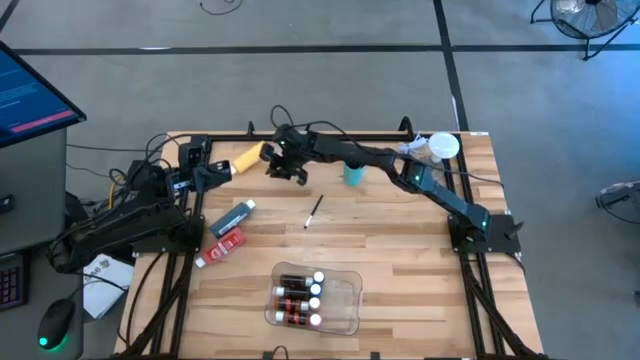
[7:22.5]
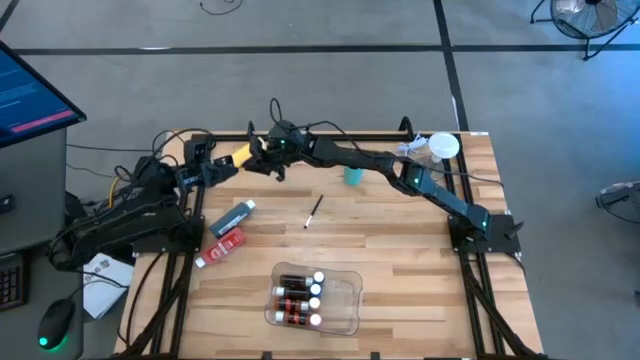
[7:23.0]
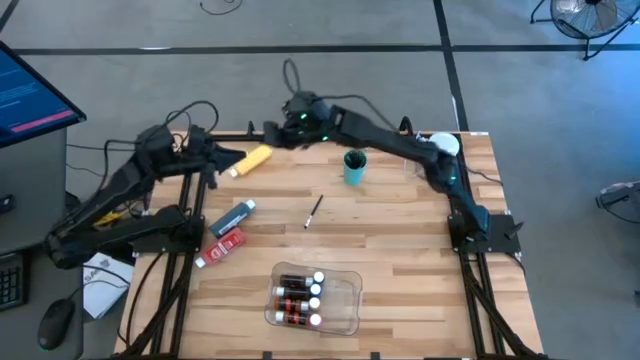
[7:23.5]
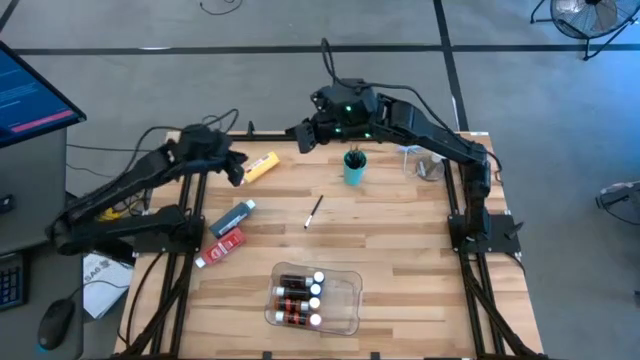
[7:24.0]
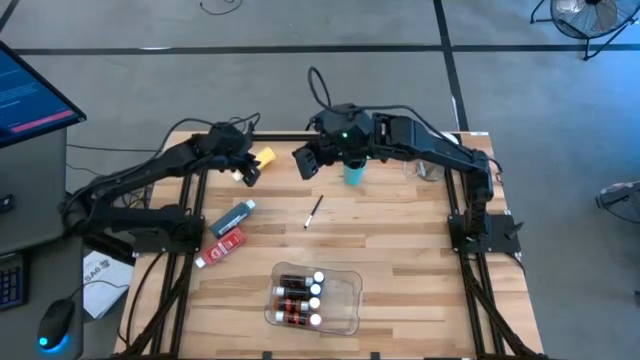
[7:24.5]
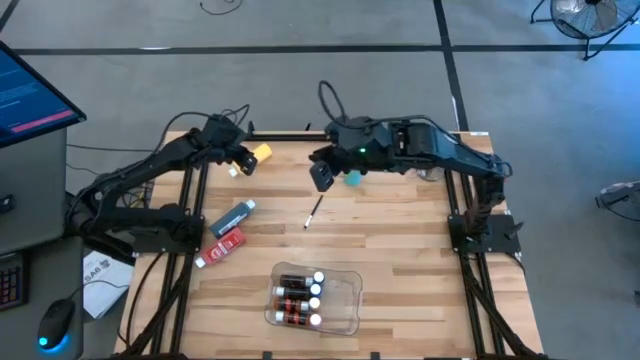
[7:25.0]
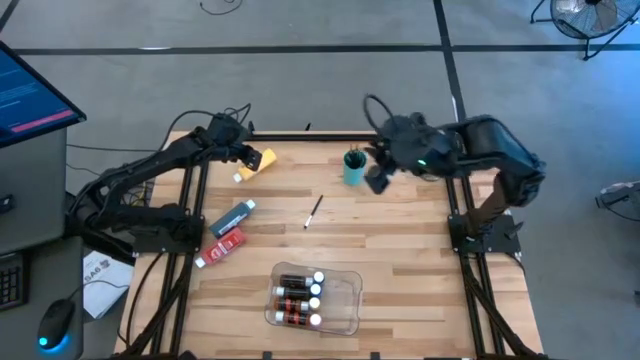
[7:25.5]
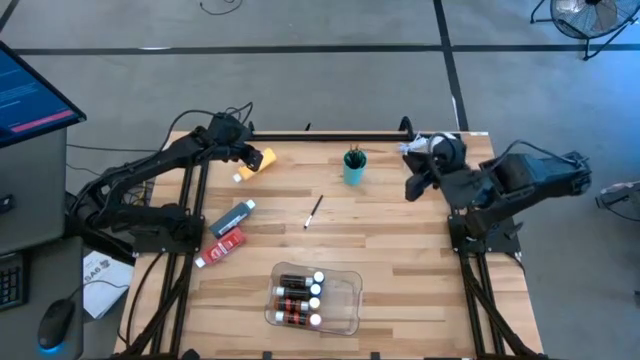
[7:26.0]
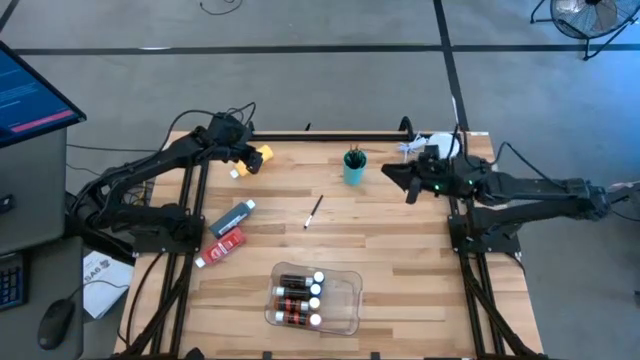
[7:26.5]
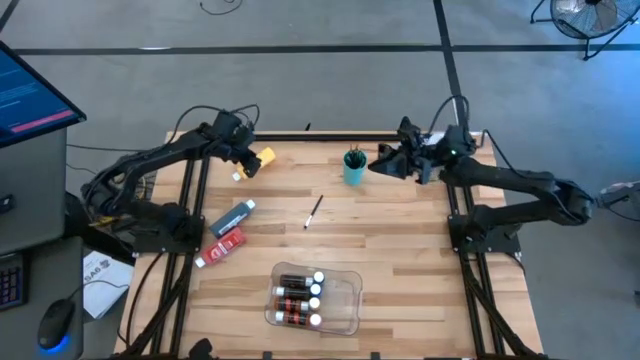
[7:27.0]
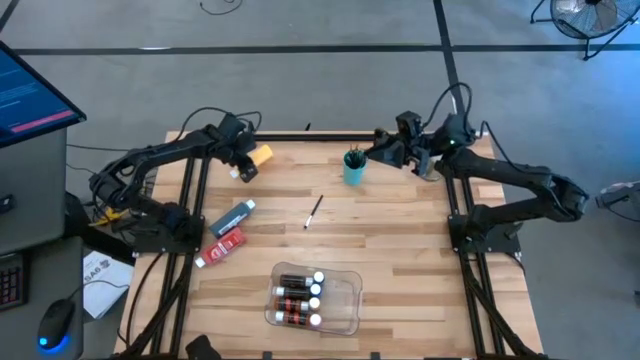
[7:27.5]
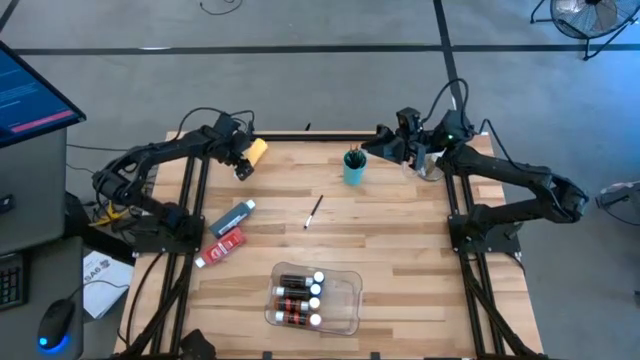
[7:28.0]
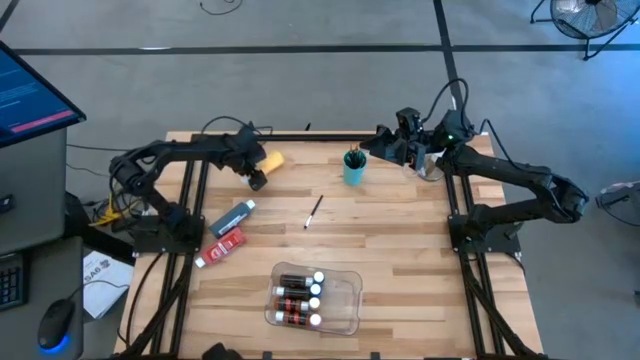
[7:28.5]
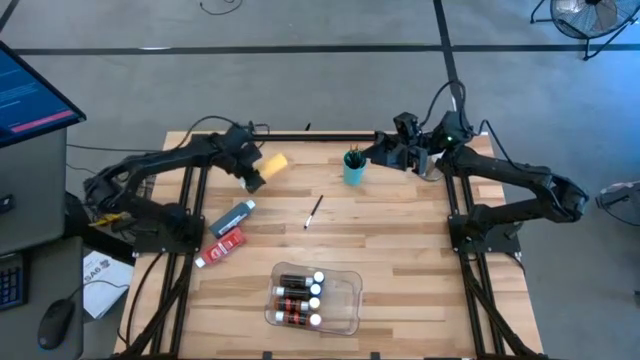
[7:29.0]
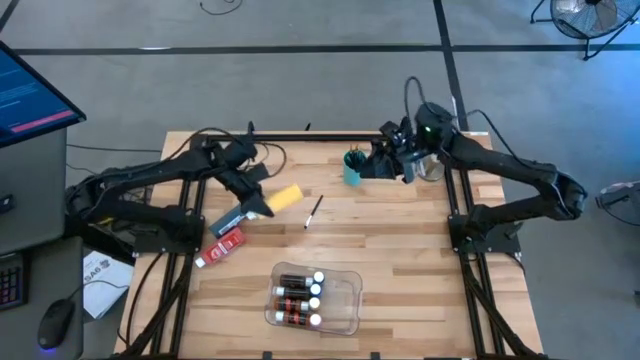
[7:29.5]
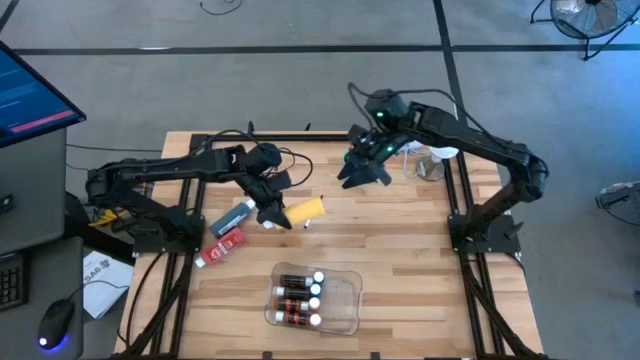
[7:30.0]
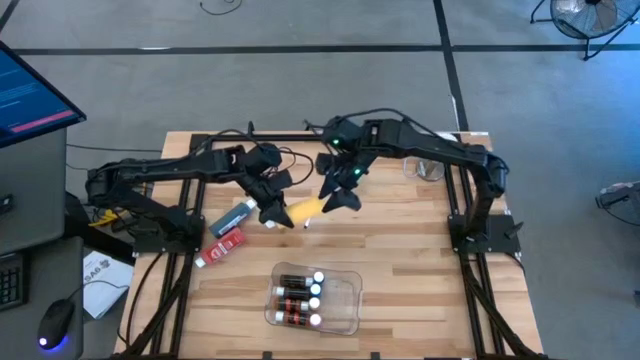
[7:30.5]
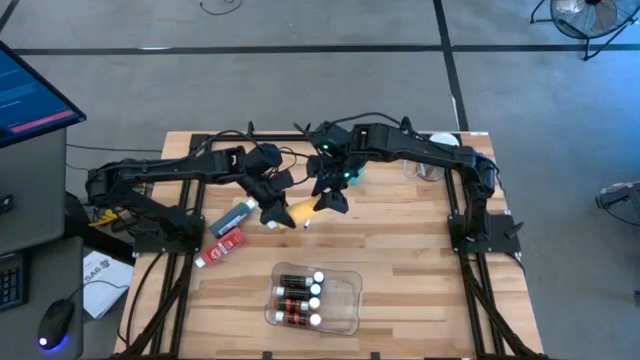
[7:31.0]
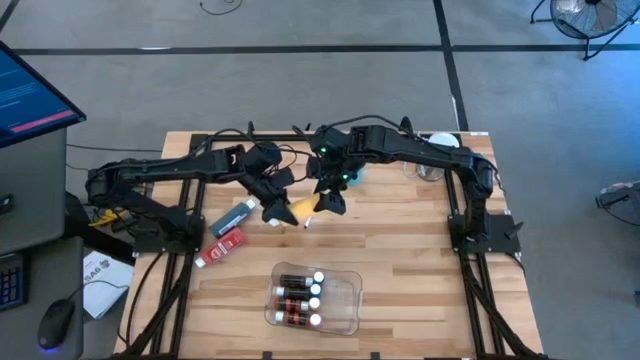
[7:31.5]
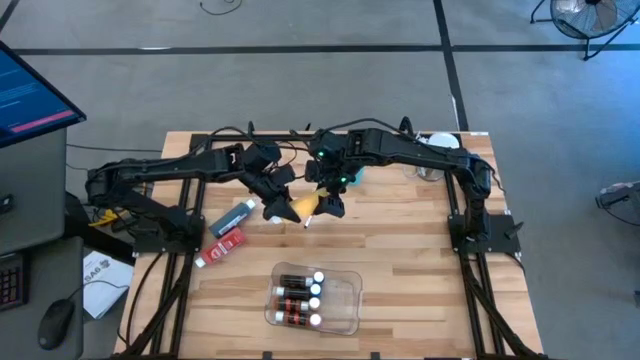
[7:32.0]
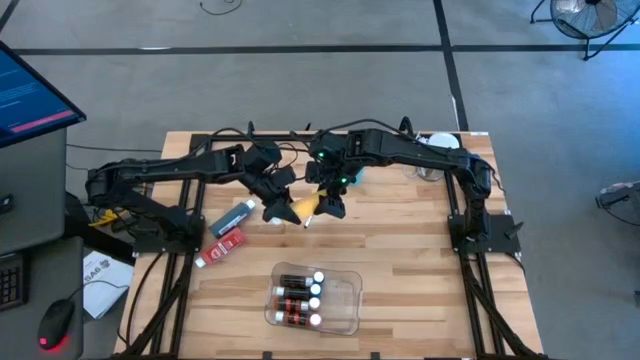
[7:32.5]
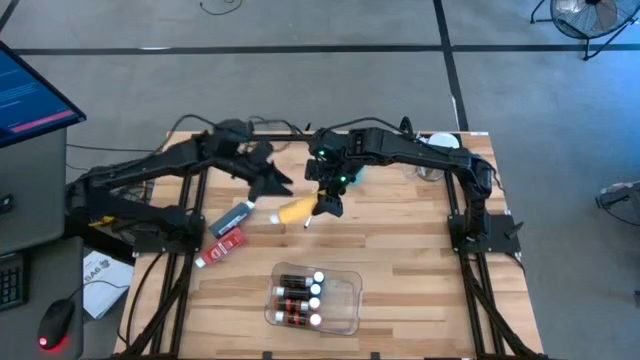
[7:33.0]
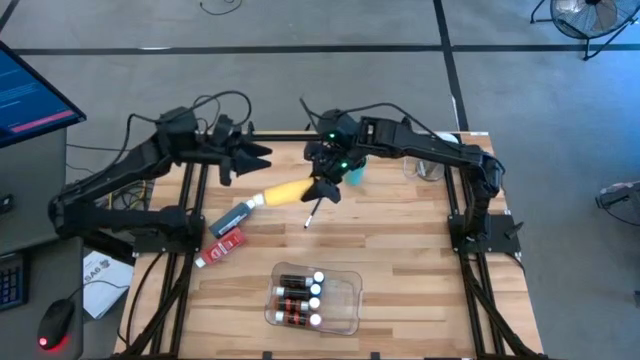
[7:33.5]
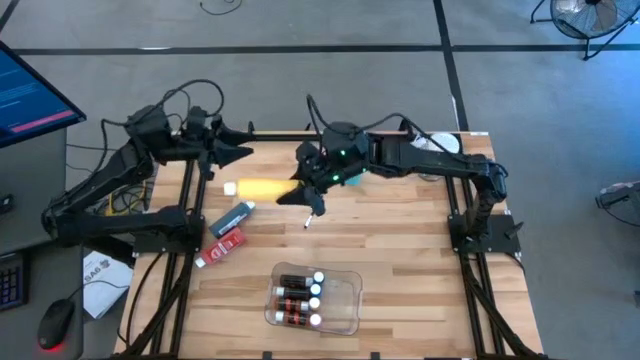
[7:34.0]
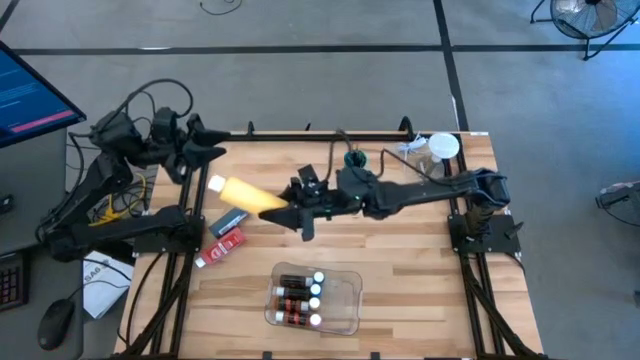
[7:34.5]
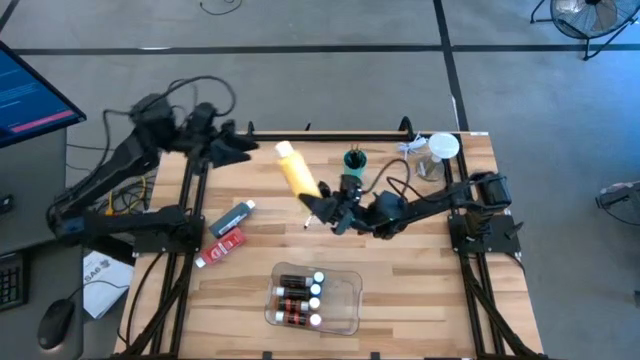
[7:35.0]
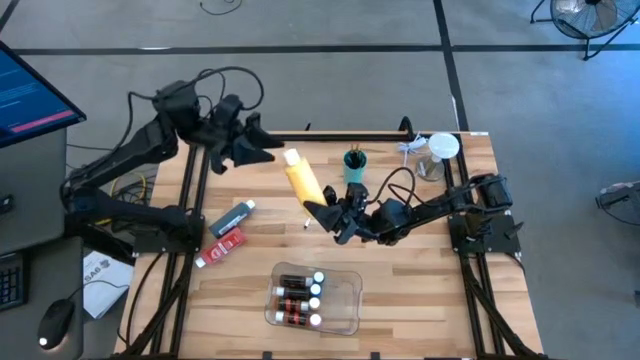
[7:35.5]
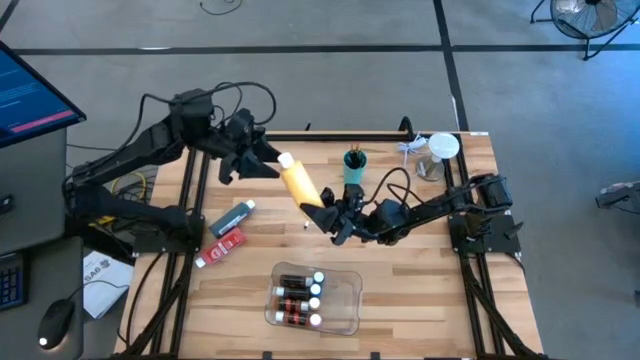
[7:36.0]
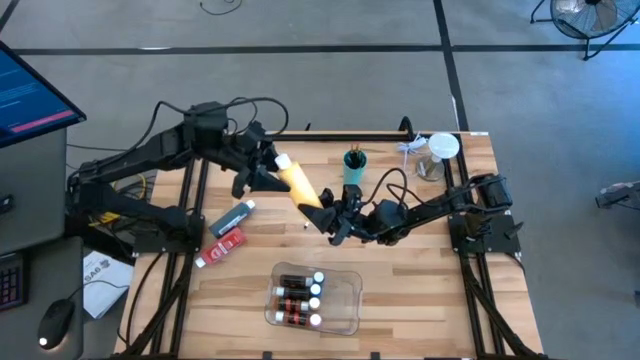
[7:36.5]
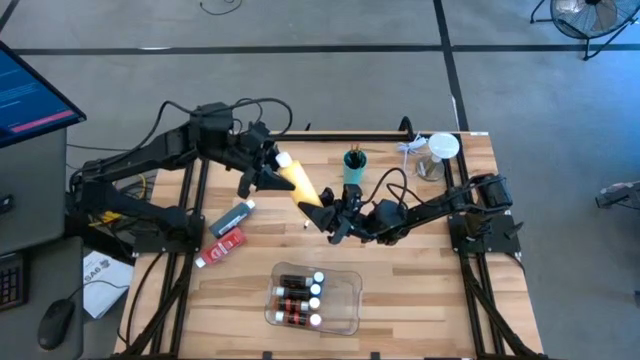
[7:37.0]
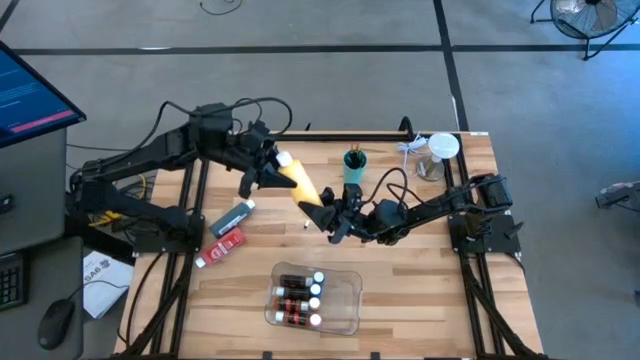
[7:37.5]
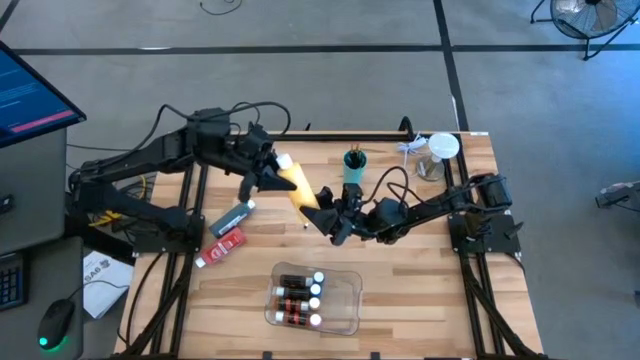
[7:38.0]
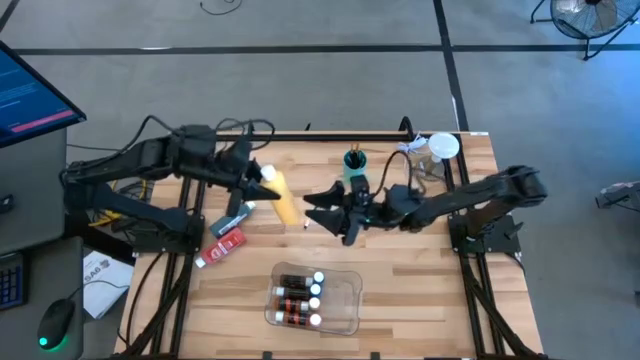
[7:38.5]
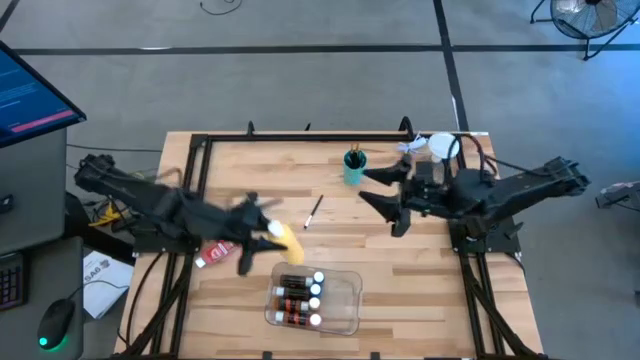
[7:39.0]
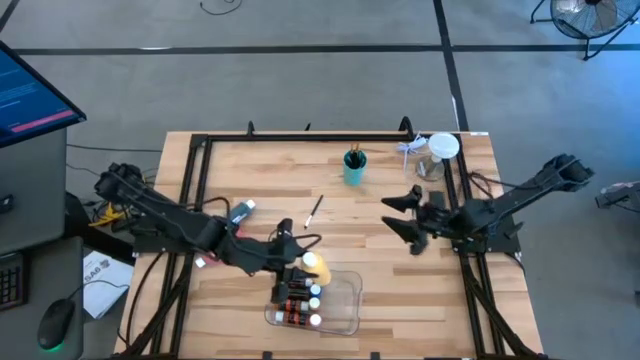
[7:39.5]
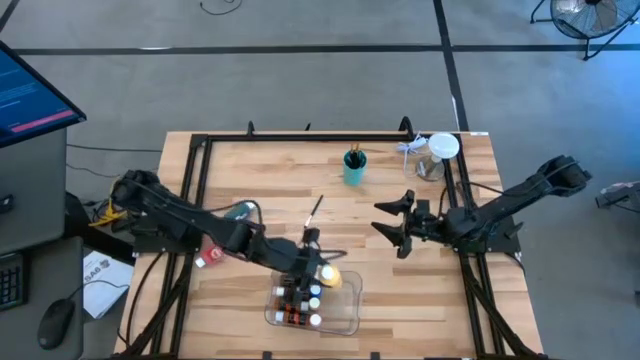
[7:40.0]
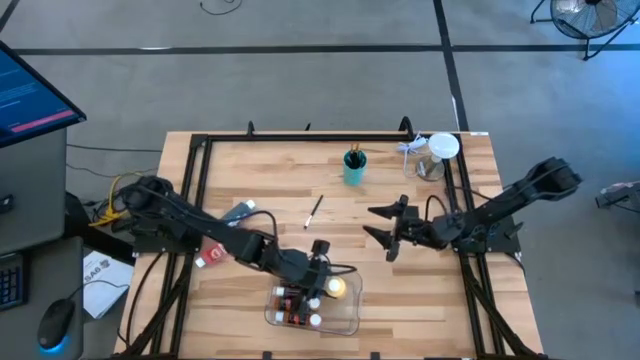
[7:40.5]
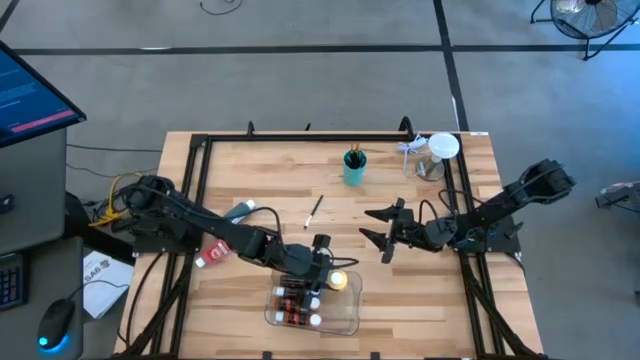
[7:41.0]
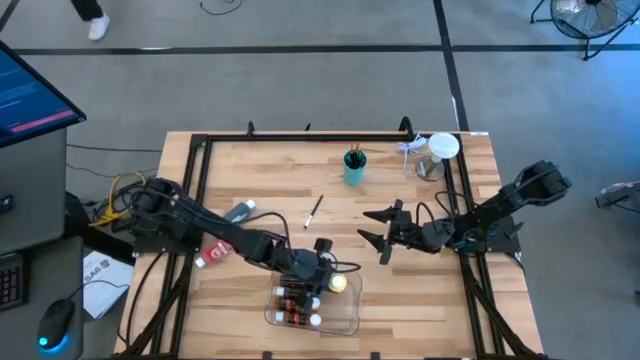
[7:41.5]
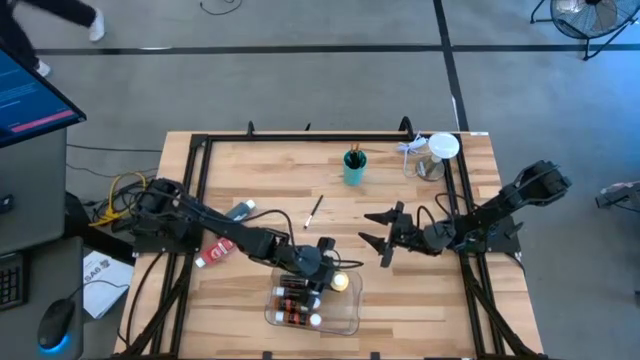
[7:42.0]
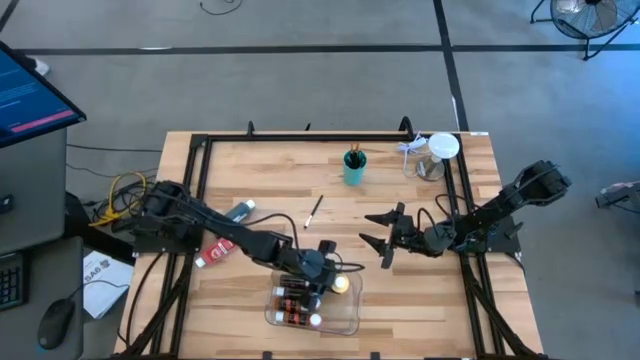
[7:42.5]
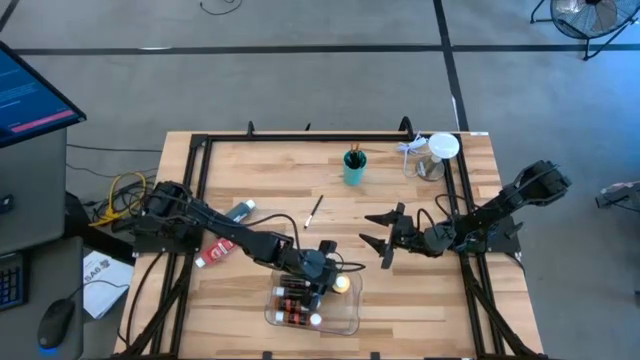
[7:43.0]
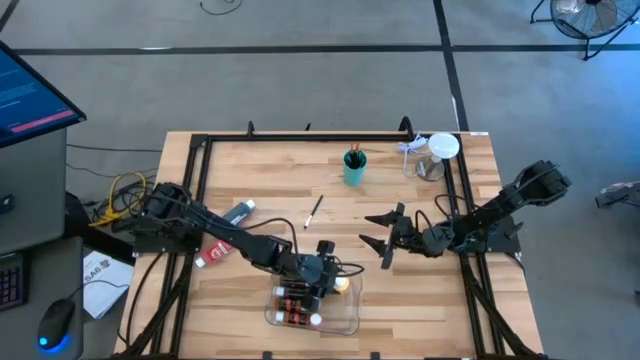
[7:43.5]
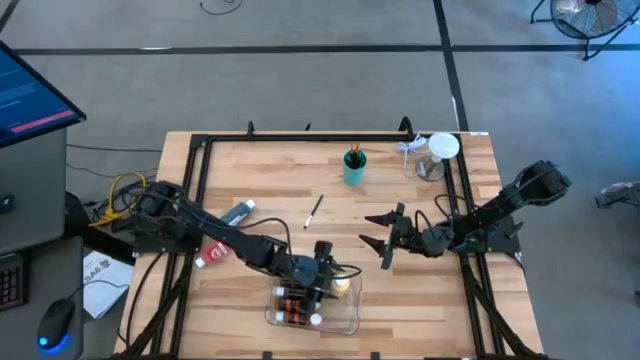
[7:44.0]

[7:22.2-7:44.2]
Task: Pick & Place Paint Supplies
Put the yellow paint bottle into the transparent bin
